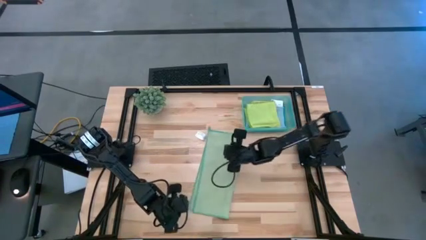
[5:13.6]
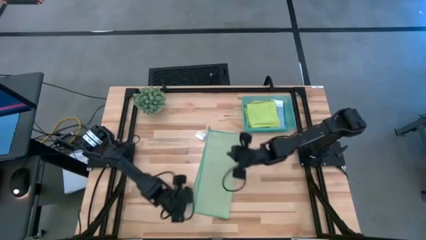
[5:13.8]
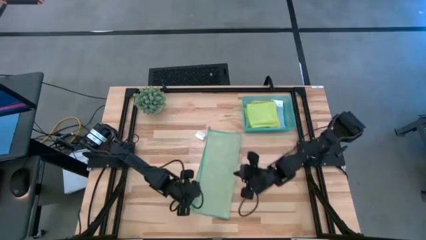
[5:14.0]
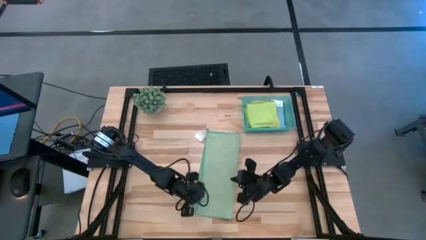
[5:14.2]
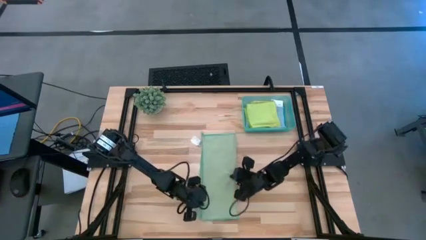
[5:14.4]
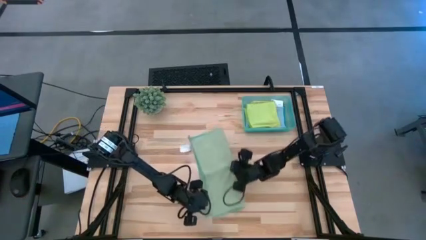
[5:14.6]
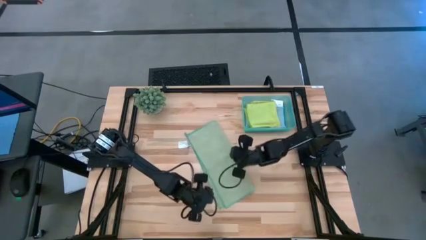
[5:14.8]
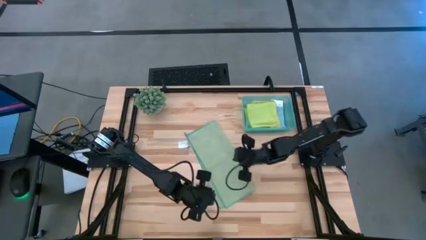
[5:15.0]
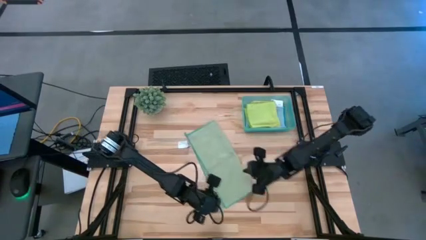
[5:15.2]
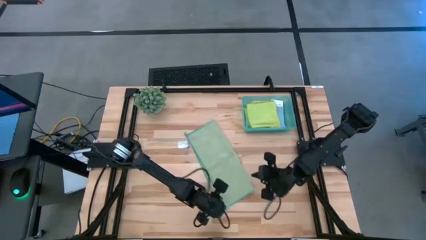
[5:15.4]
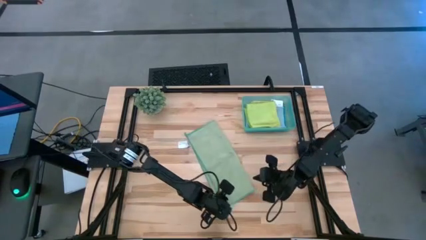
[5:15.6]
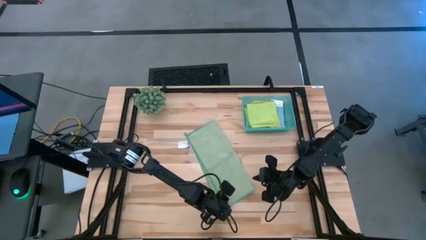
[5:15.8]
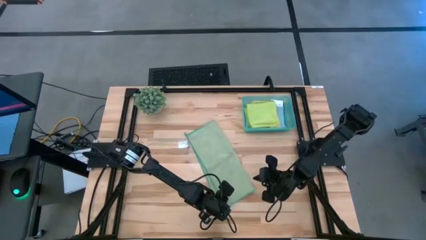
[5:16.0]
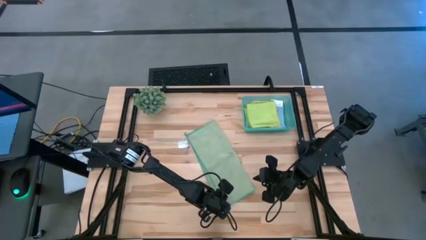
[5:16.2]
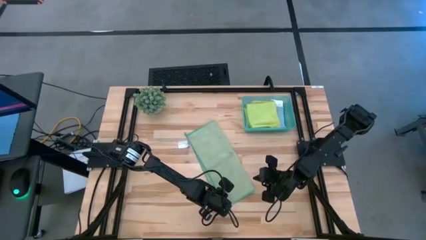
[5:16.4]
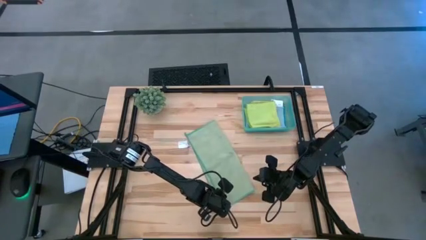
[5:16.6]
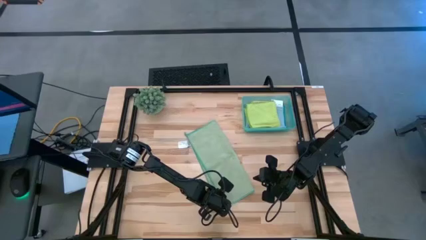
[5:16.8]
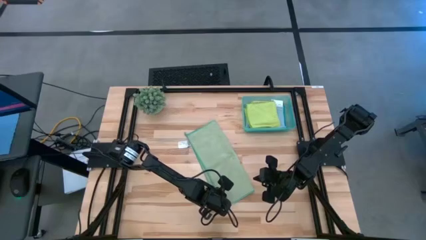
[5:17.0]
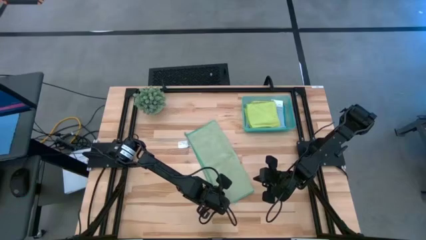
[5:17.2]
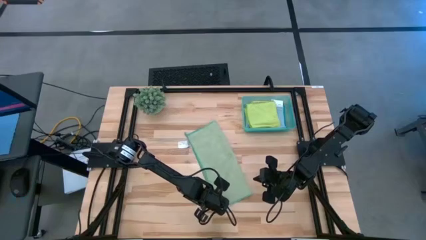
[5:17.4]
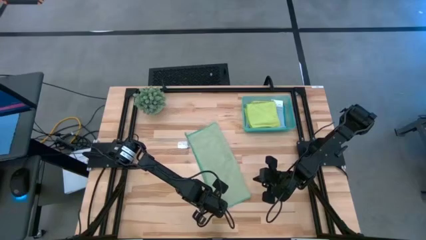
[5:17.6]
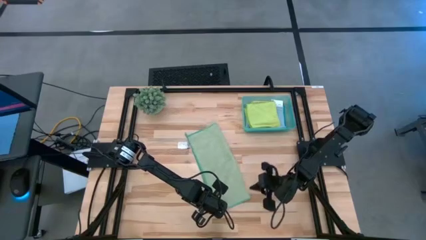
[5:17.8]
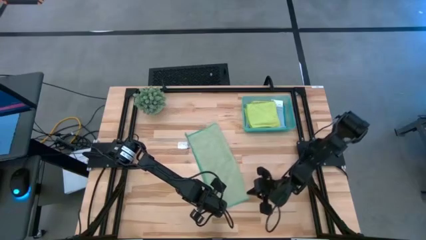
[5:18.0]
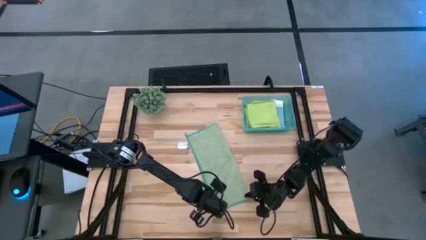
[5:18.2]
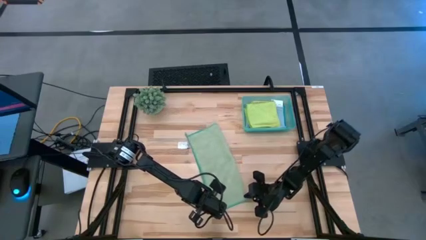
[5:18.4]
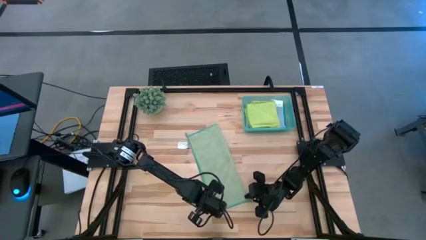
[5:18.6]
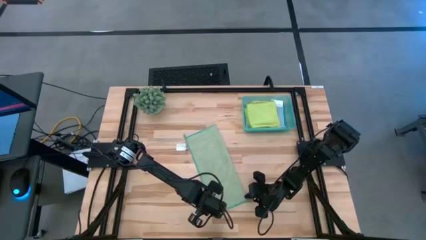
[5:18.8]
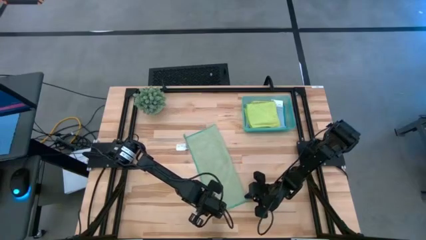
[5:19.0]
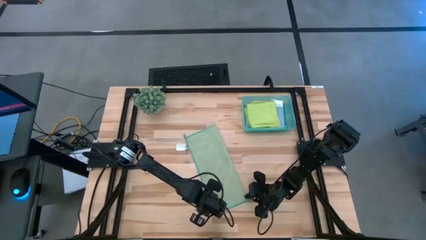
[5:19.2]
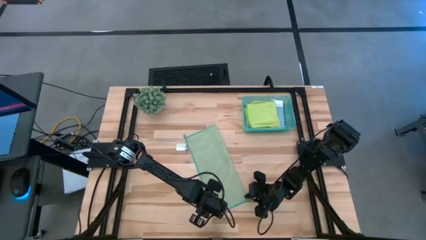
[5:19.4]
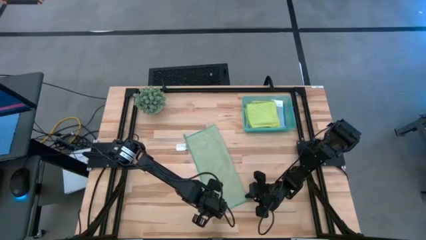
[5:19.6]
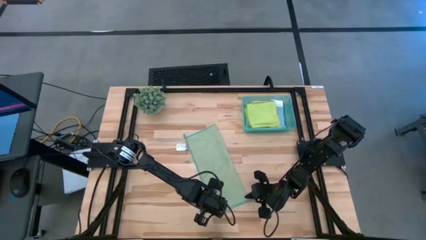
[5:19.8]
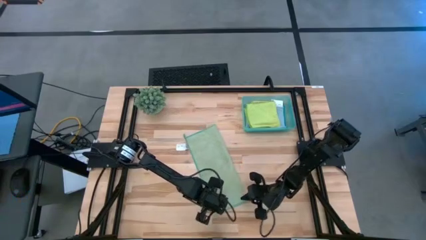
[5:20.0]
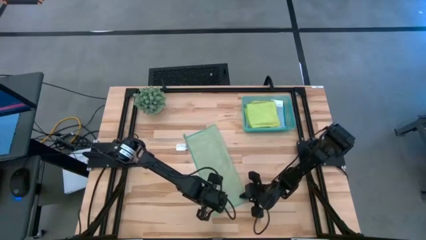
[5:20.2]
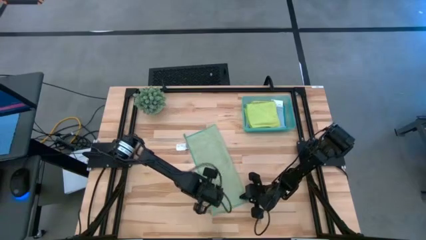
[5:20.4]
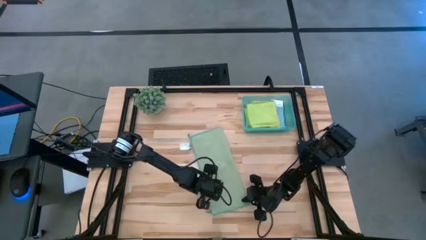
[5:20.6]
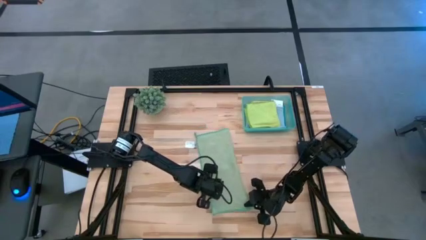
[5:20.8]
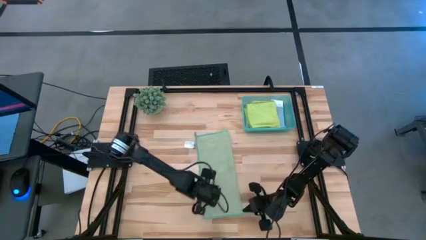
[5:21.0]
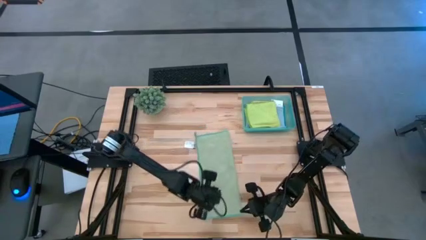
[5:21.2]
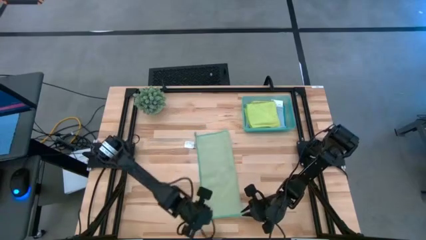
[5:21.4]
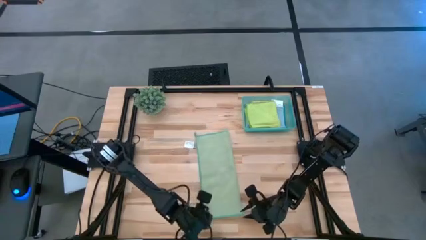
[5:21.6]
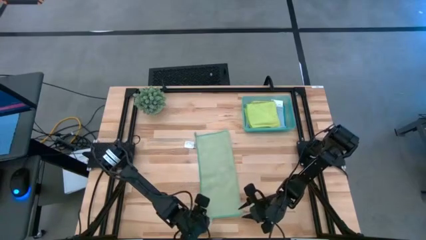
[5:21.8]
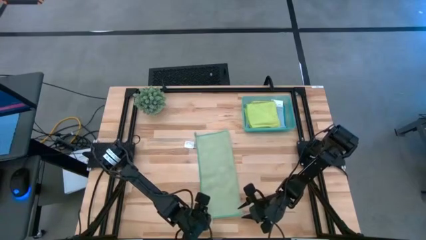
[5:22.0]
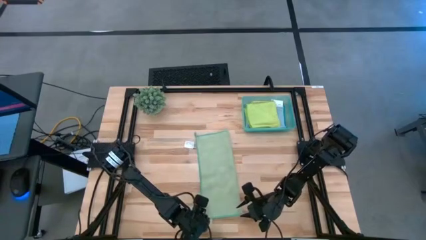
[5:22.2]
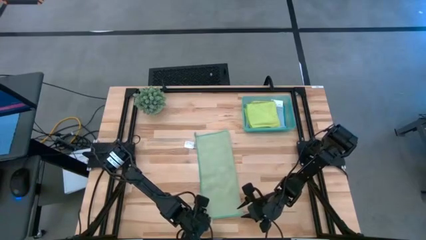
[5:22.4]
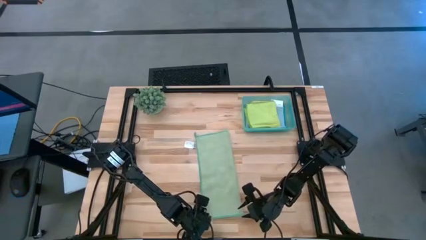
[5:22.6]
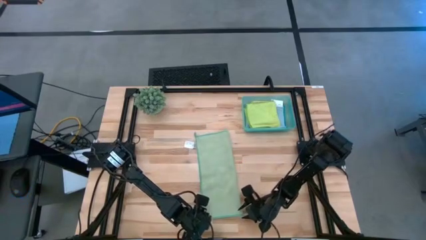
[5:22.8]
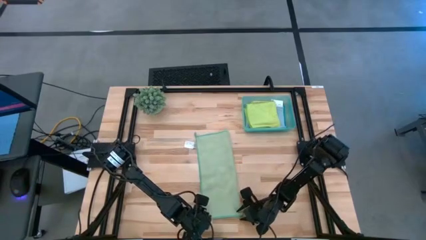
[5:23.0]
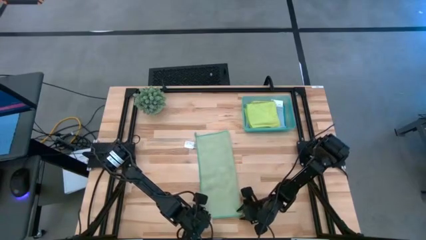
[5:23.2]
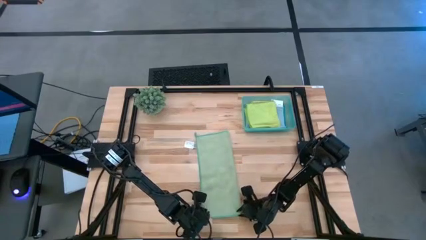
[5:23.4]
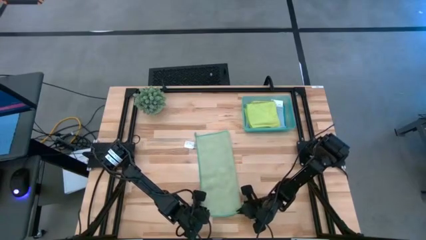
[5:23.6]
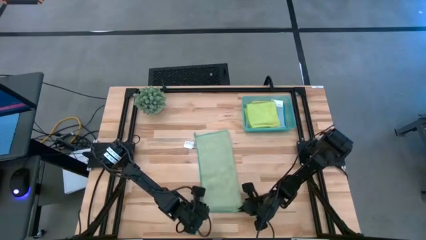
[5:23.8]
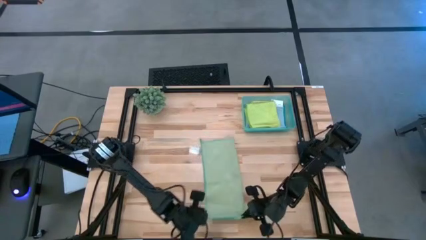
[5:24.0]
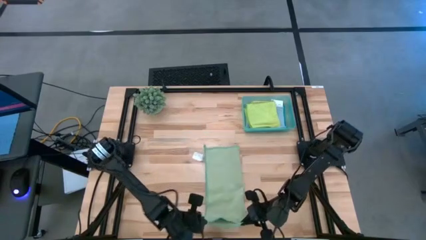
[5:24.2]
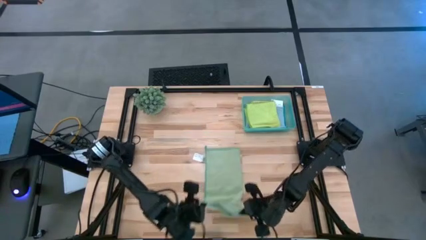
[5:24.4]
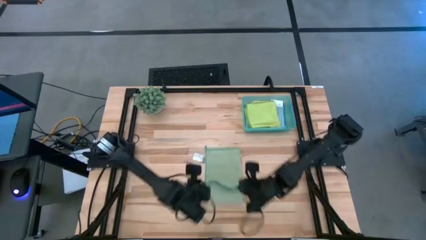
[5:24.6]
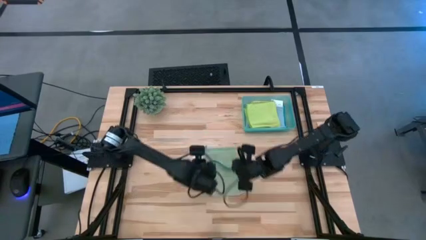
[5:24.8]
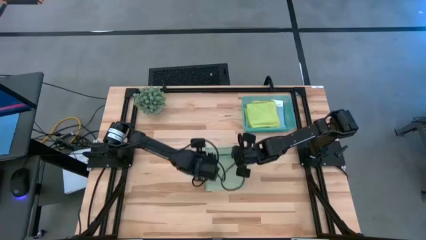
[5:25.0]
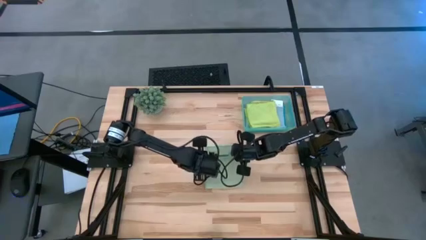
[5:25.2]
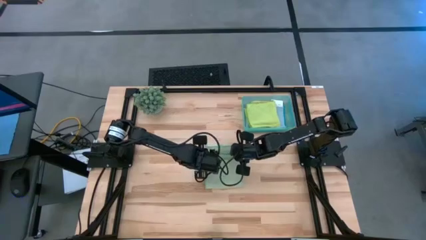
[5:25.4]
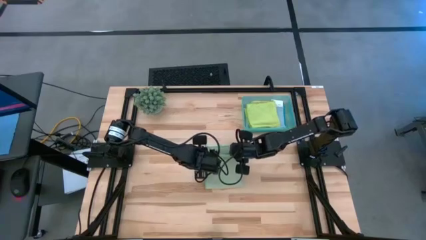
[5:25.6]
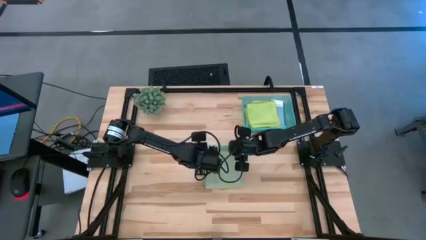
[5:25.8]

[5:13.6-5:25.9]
Task: Fold microfiber towels
Fold the light green microfiber cloth

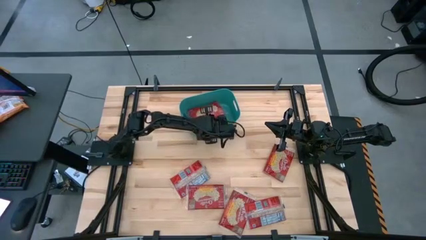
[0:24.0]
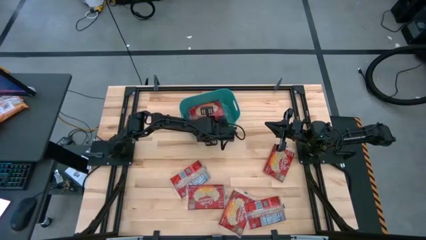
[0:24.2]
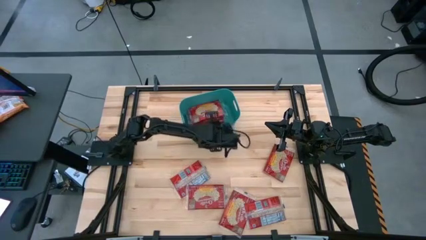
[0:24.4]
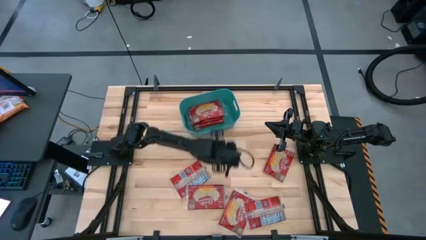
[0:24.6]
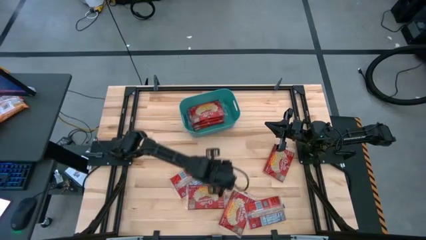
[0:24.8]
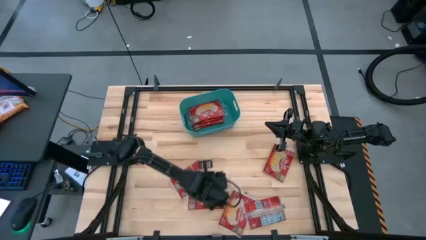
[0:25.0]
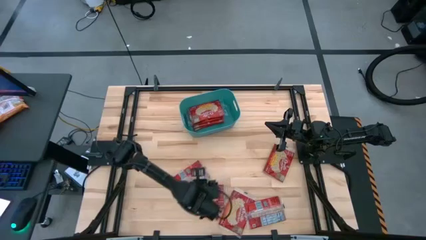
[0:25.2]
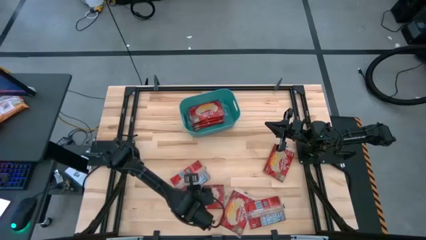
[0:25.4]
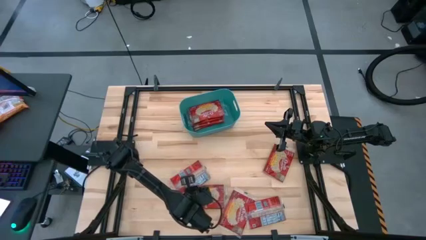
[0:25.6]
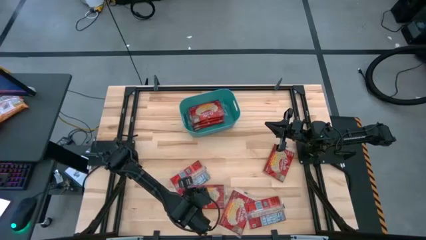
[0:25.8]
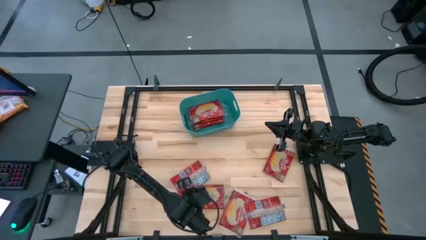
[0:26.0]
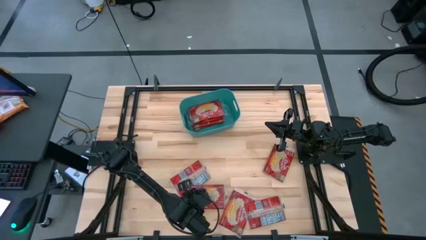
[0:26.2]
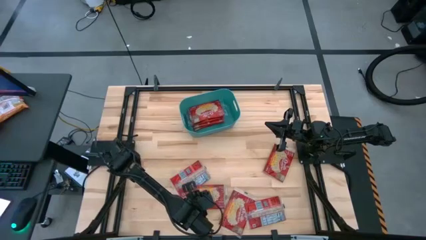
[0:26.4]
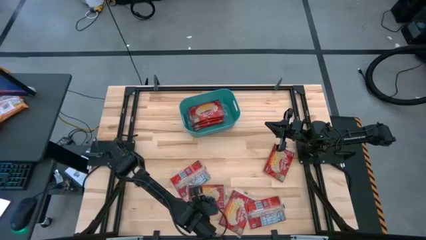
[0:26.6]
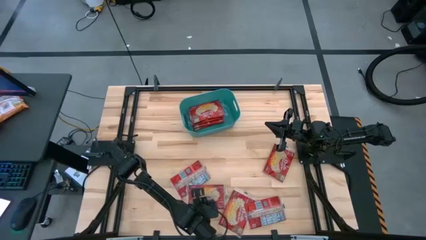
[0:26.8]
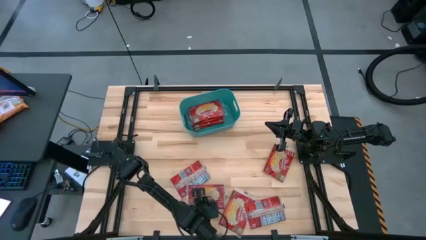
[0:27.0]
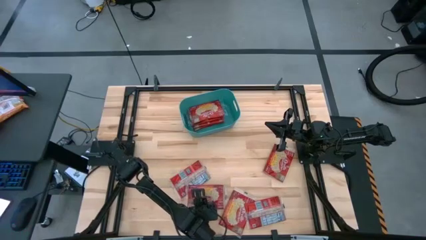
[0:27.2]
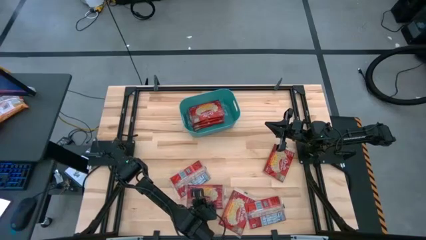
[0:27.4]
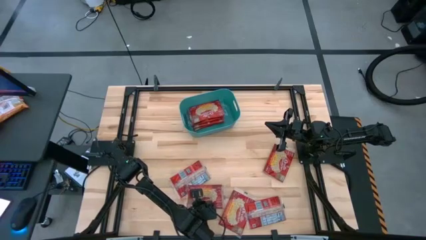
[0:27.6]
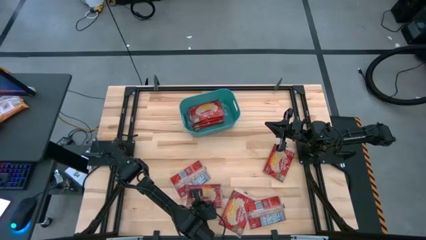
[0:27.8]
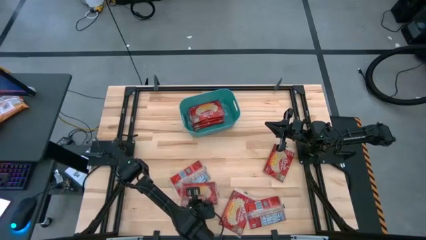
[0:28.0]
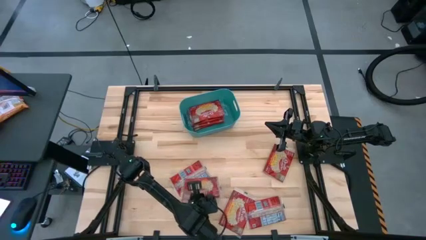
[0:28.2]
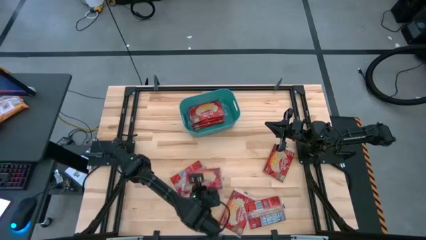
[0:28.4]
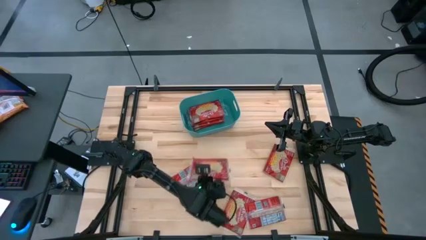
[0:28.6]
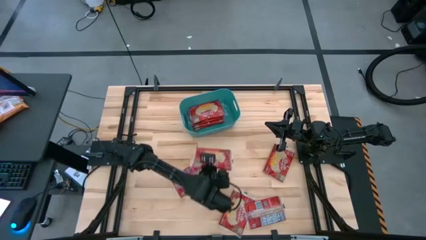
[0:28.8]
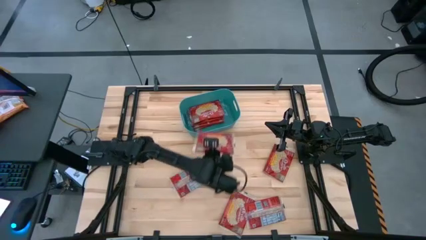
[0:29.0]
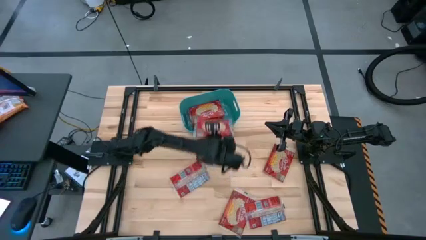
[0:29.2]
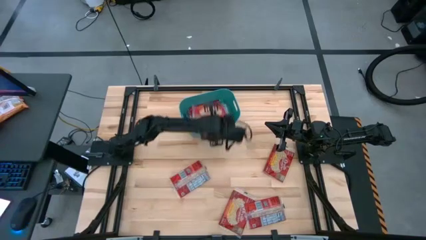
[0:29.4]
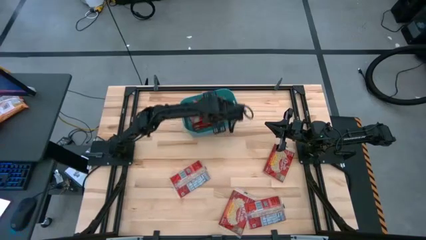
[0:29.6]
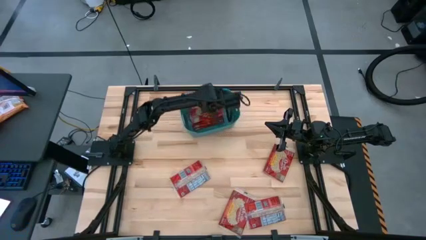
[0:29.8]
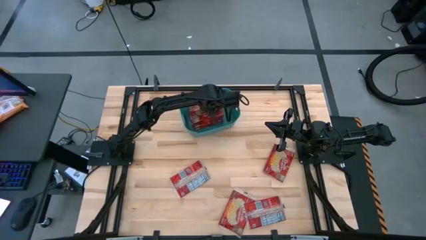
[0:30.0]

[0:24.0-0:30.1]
Task: Sort popcorn bags into baskets
Put the red popcorn bag into the green bin
